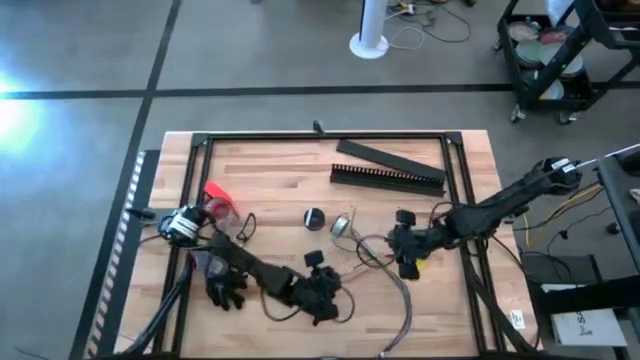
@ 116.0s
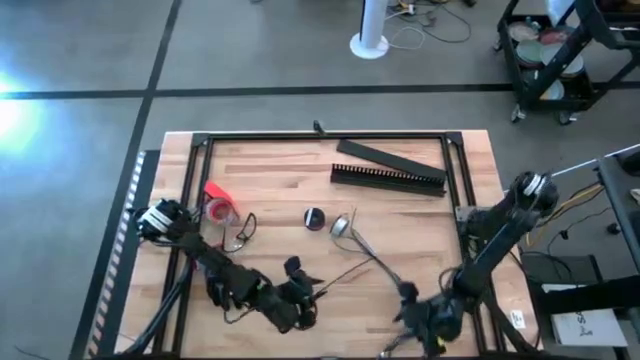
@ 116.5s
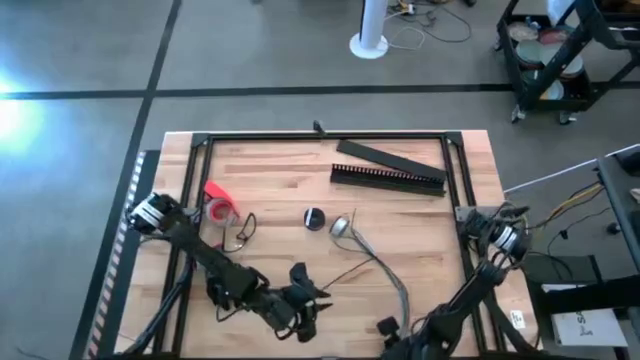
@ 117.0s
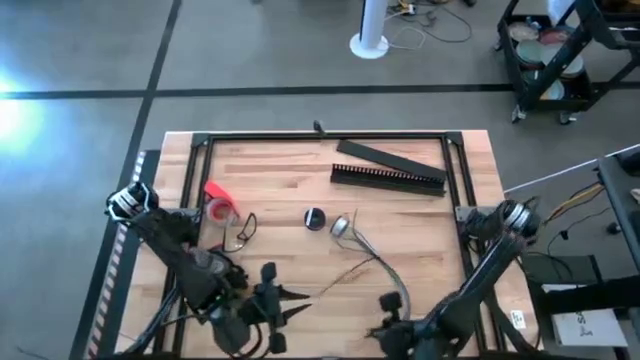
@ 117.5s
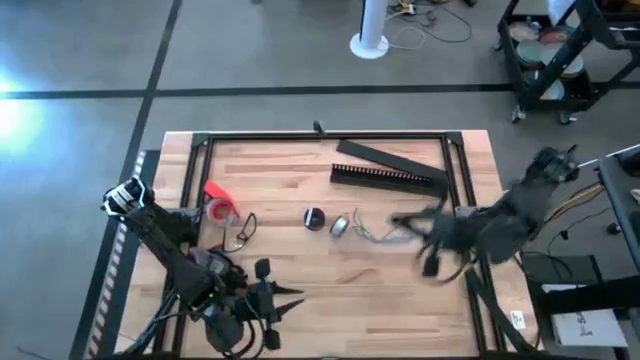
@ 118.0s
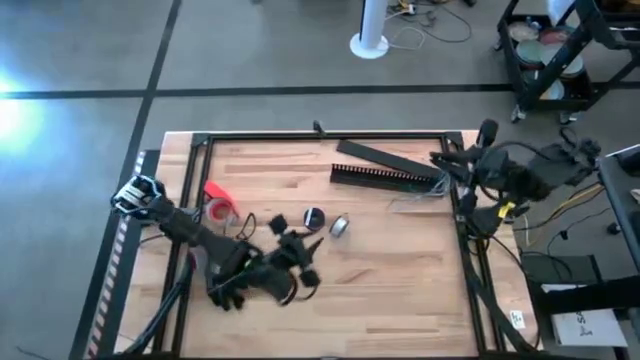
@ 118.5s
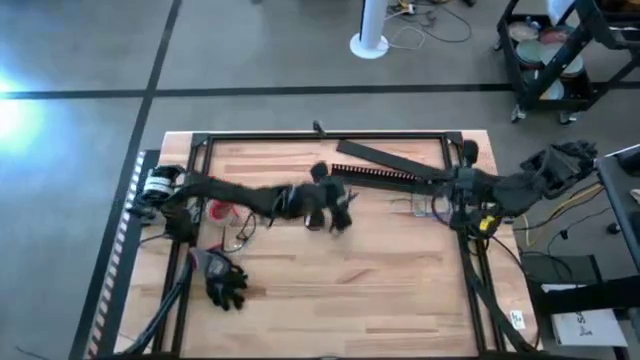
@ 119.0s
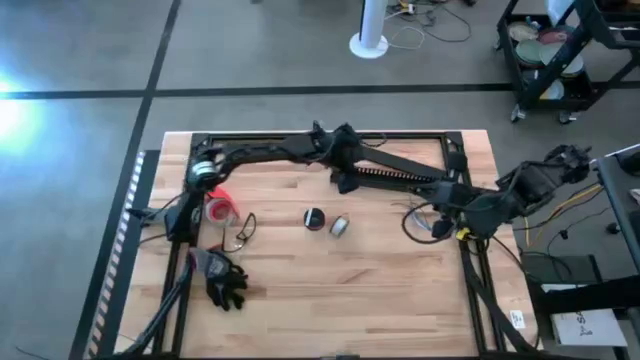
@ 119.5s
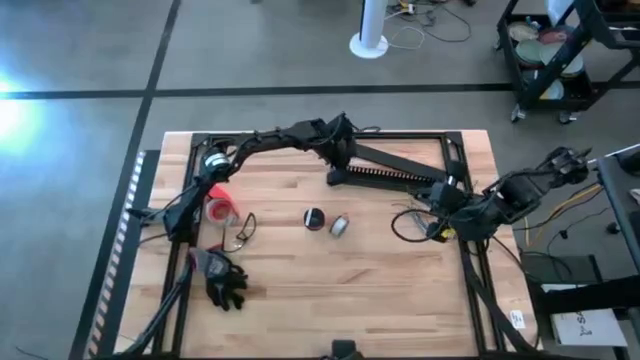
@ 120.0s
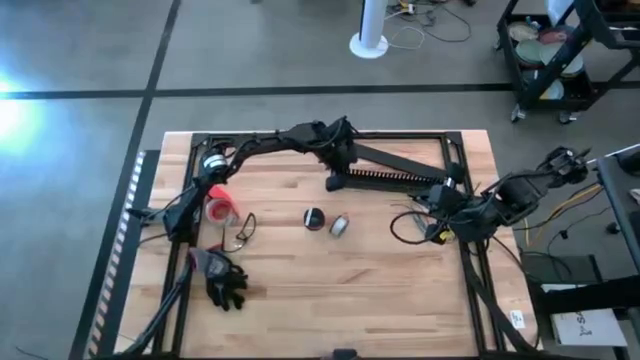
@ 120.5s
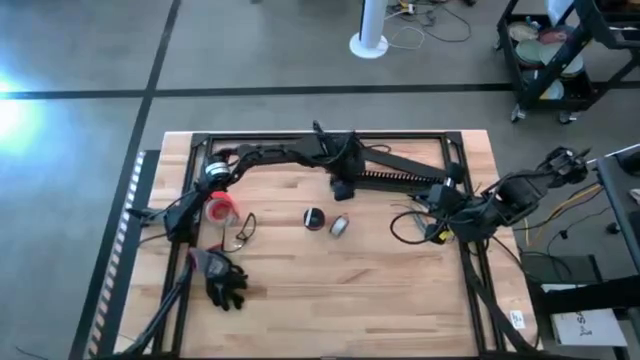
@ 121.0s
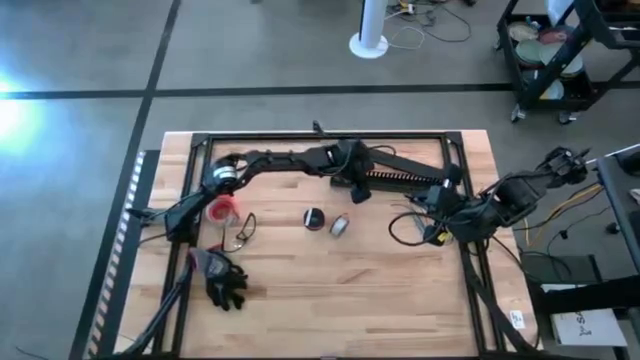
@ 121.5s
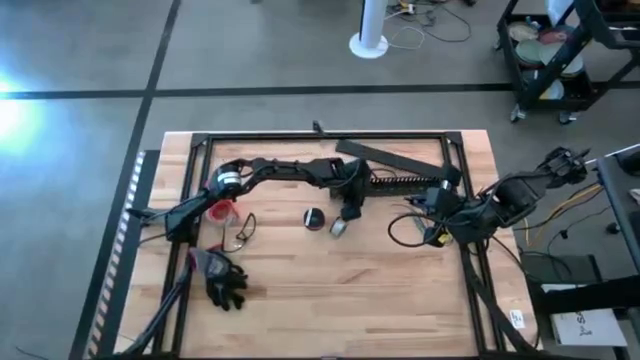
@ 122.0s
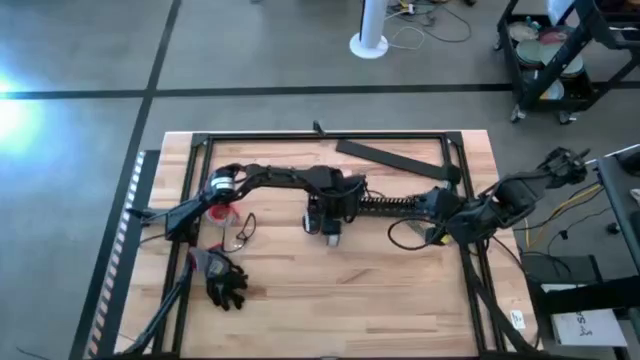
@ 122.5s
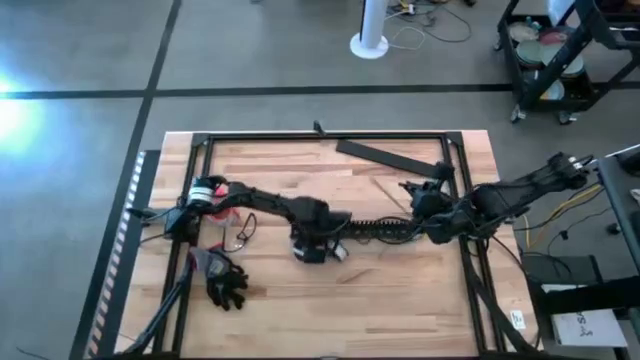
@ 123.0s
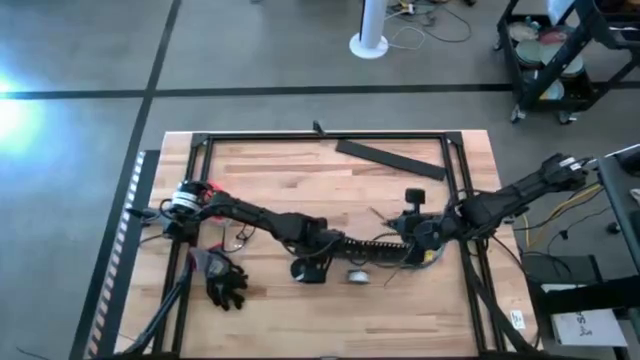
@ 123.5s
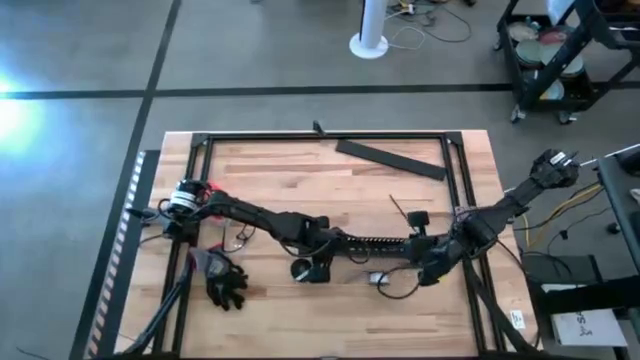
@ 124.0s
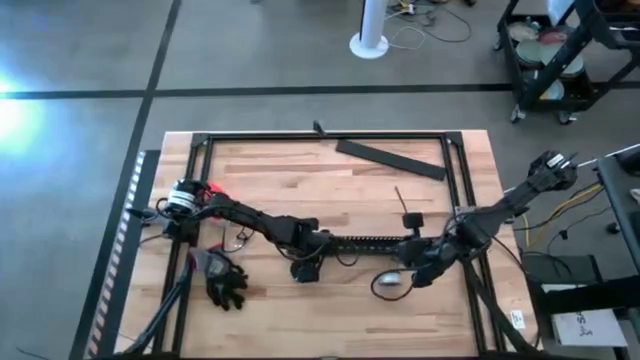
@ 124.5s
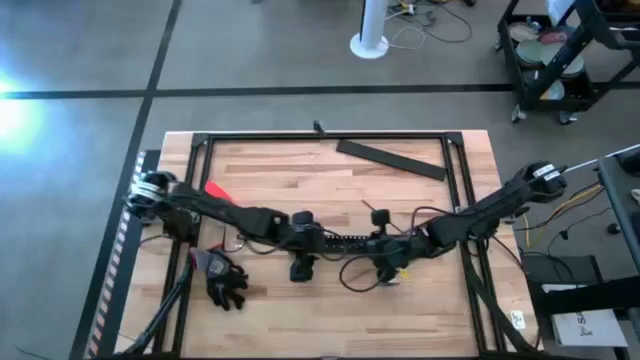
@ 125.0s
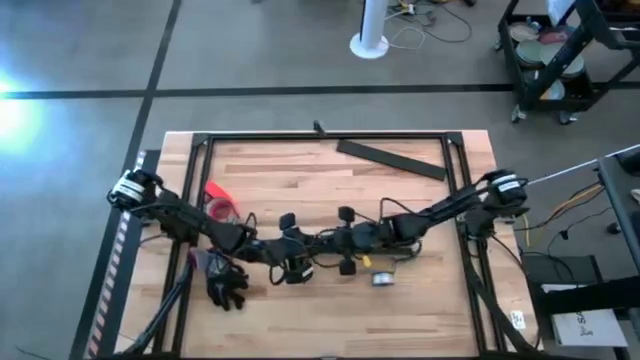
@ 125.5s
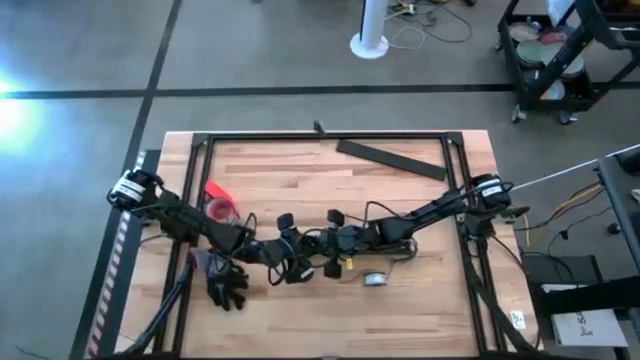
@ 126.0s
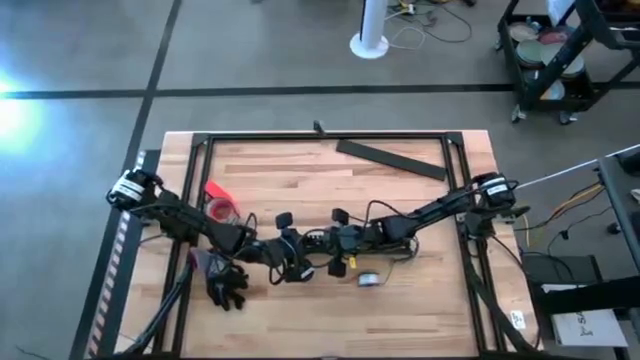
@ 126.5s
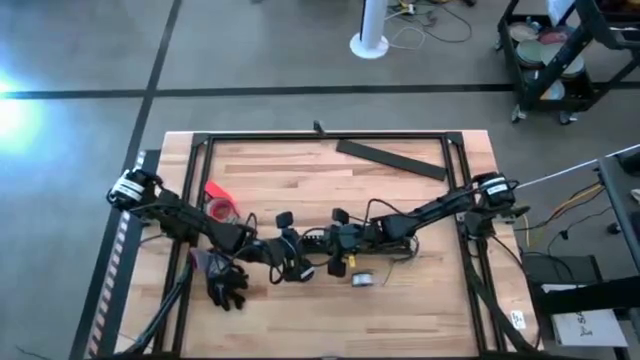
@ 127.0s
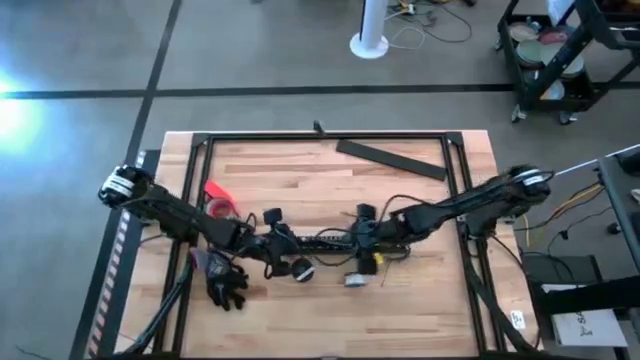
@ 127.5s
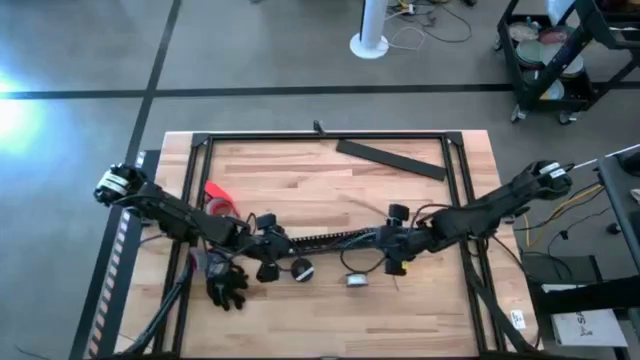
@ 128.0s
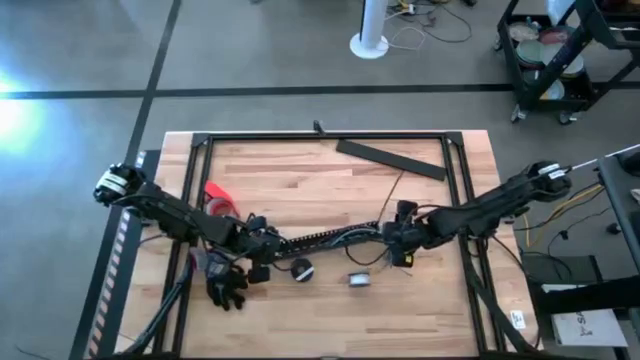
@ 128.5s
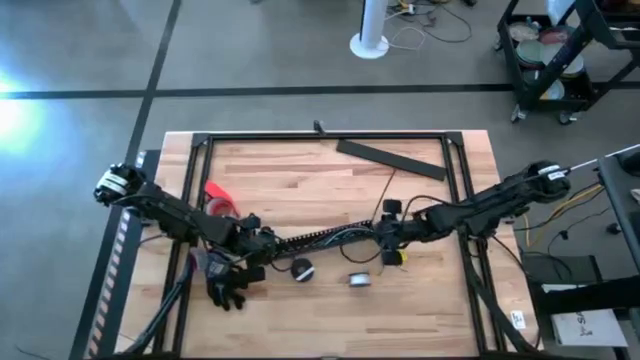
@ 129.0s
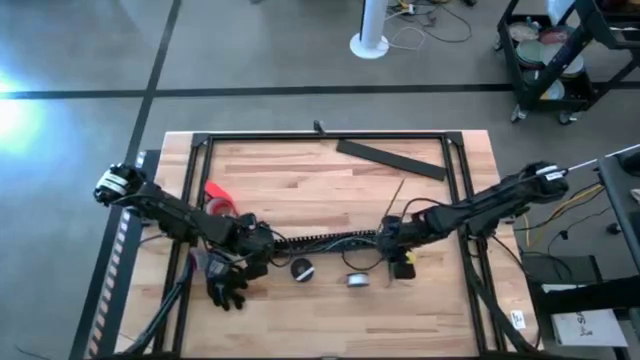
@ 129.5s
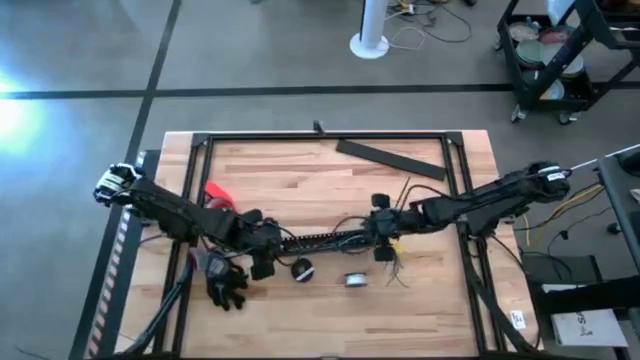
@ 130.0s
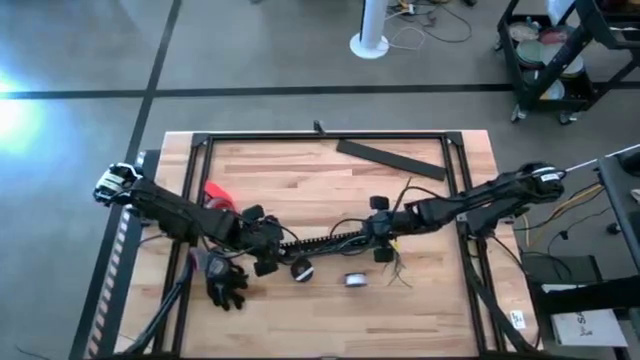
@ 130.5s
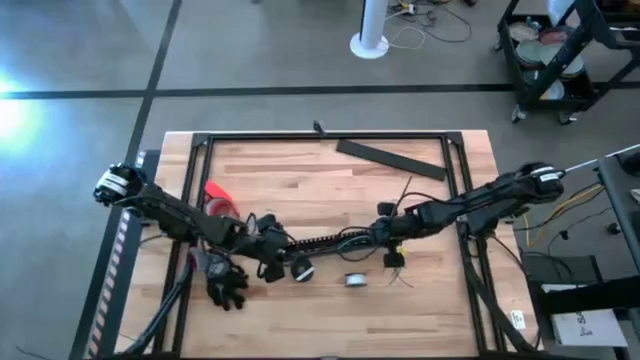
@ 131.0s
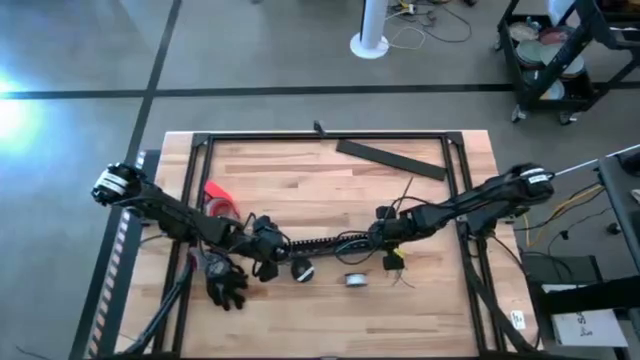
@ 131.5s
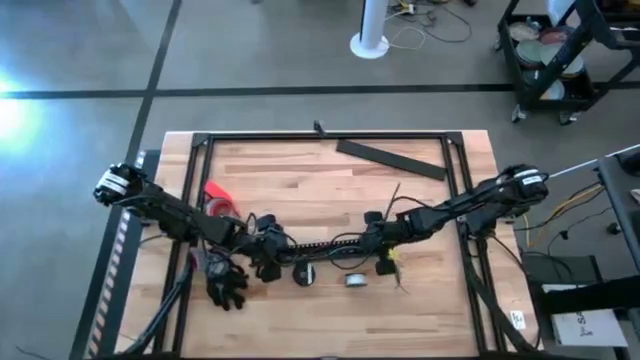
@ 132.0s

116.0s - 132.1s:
Task: Ziptie cables
Put the zip tied cables into the black cable duct

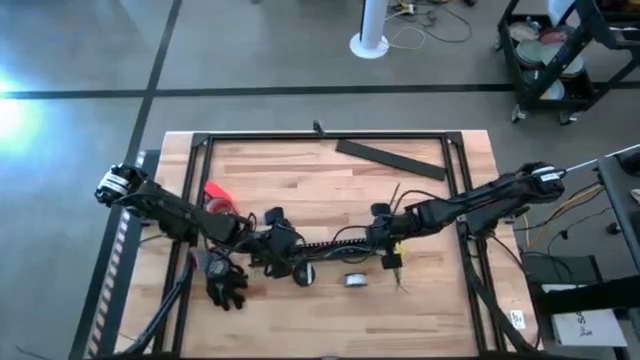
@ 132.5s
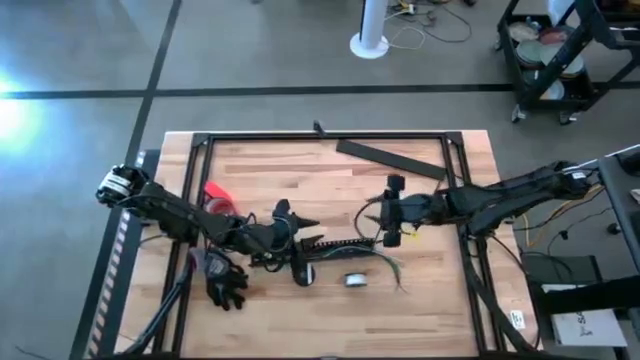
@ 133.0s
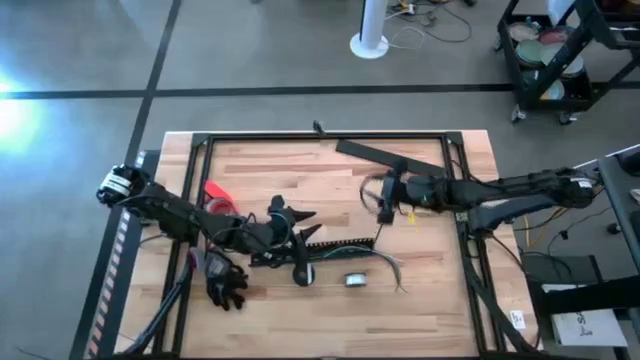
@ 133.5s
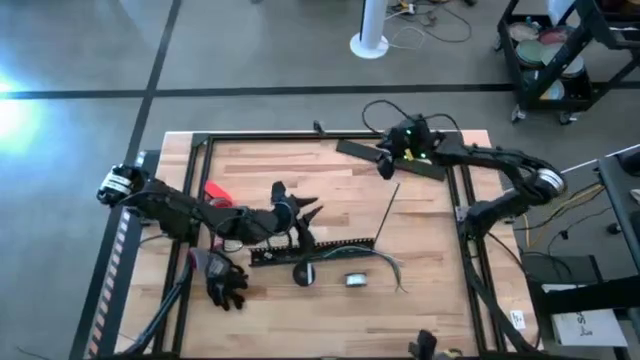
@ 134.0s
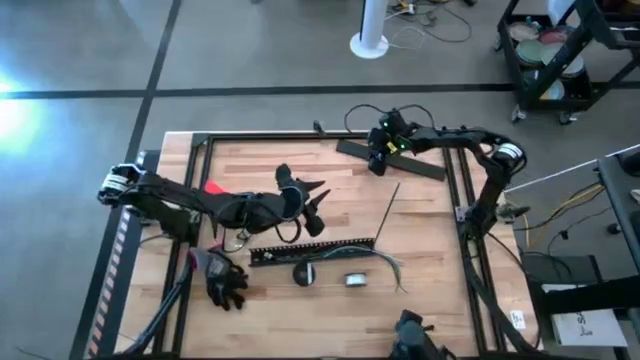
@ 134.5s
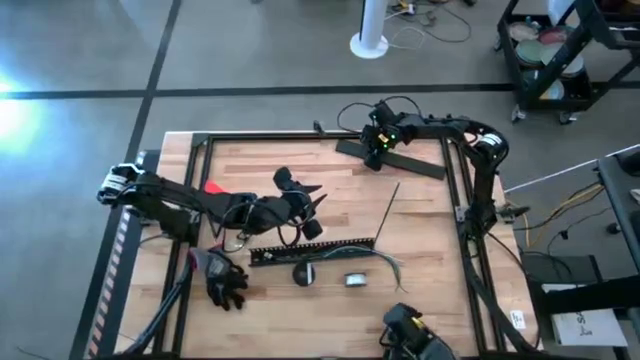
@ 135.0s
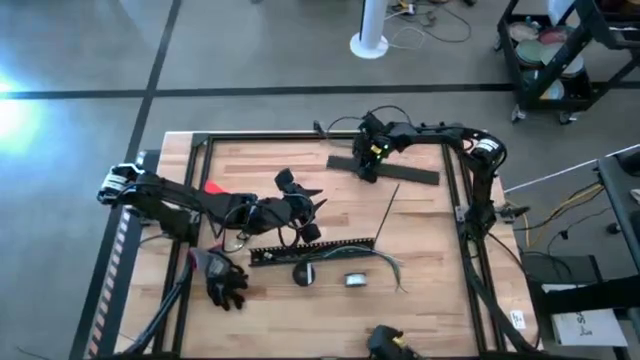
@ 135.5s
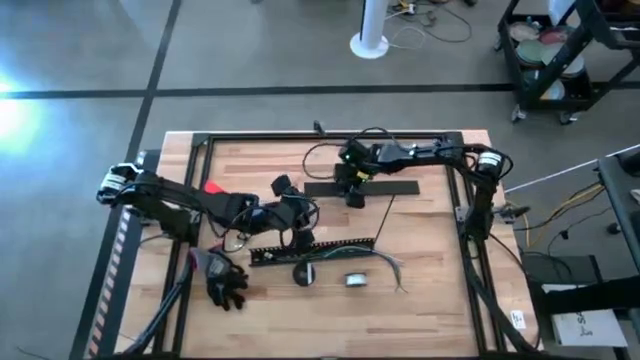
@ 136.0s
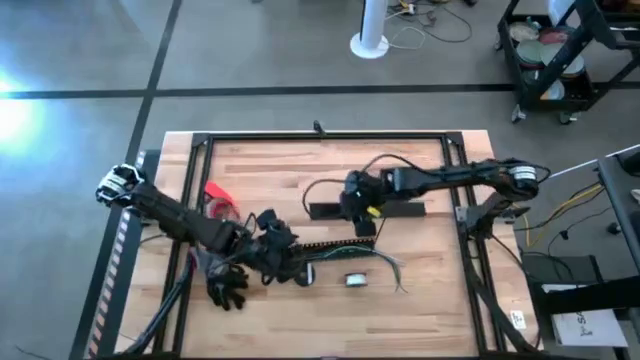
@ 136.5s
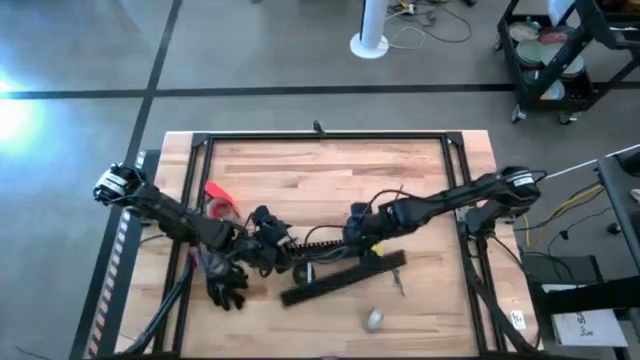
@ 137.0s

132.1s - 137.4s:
Close the black cable duct
